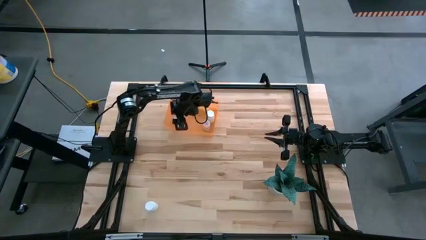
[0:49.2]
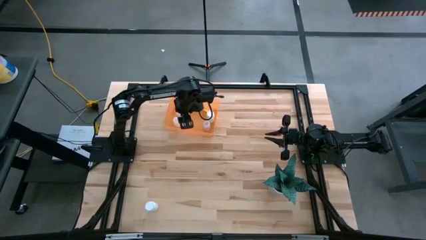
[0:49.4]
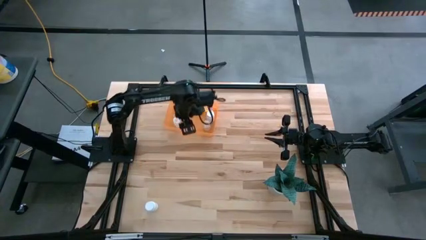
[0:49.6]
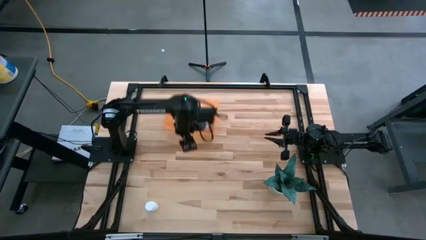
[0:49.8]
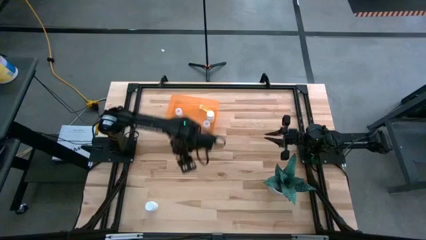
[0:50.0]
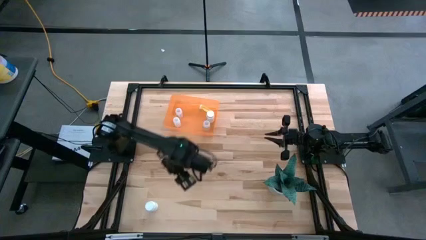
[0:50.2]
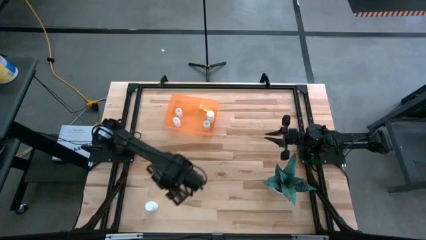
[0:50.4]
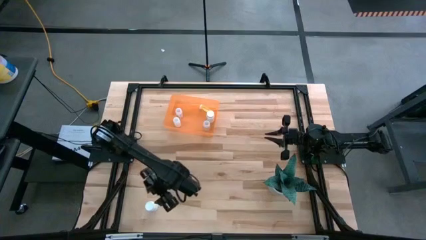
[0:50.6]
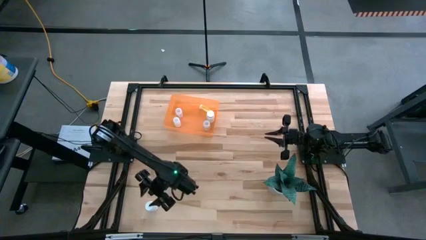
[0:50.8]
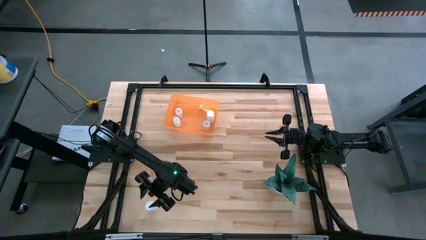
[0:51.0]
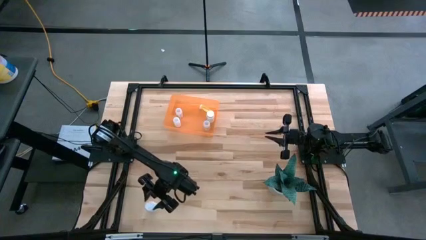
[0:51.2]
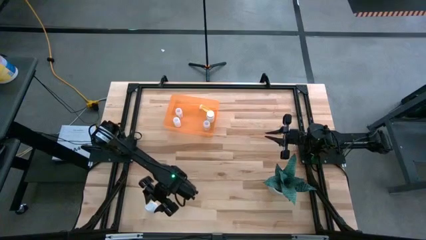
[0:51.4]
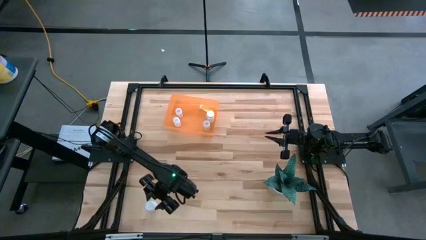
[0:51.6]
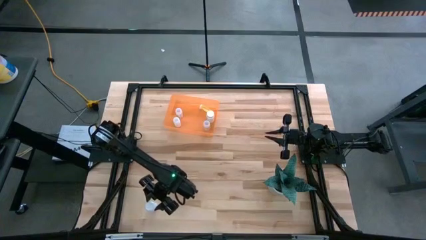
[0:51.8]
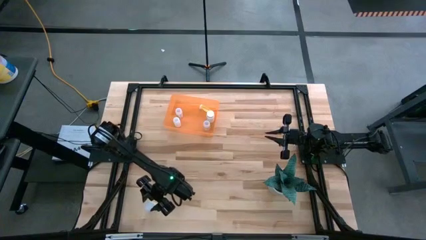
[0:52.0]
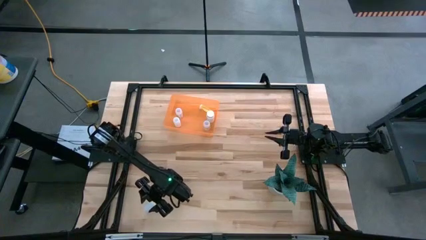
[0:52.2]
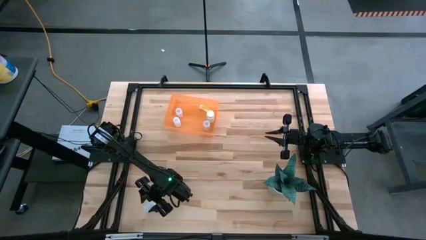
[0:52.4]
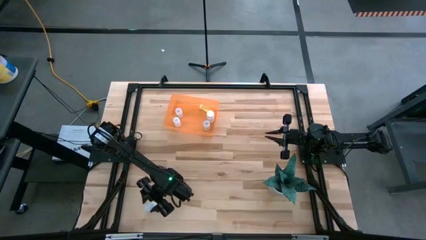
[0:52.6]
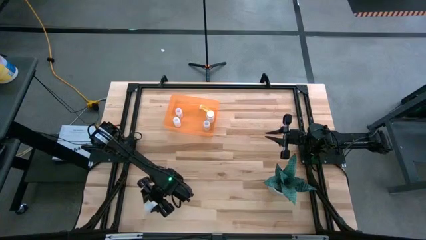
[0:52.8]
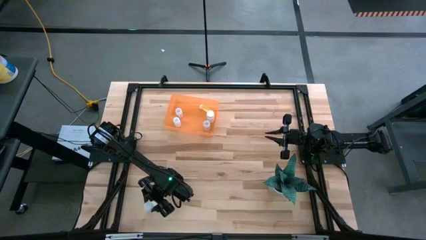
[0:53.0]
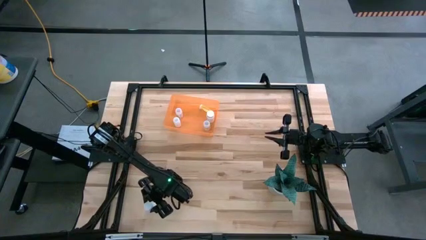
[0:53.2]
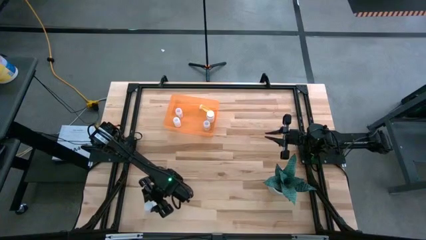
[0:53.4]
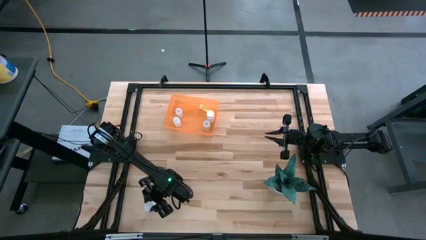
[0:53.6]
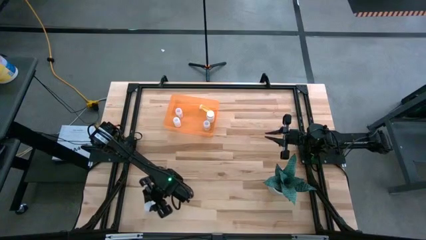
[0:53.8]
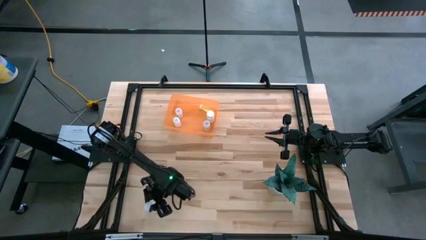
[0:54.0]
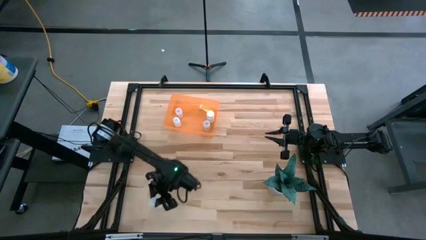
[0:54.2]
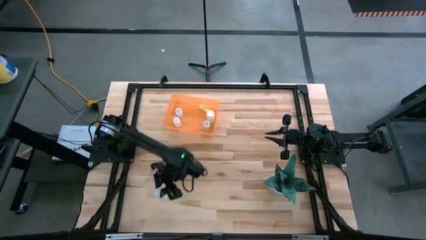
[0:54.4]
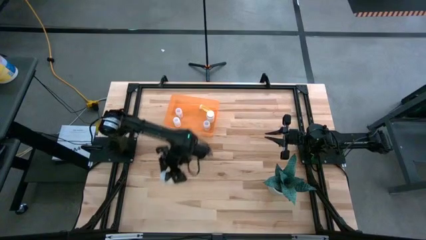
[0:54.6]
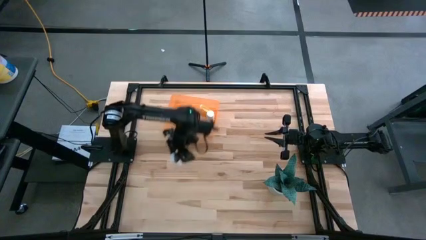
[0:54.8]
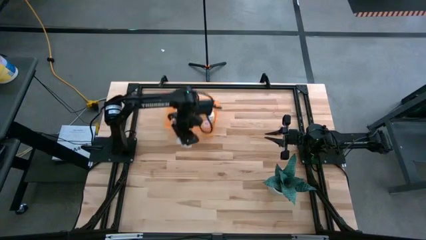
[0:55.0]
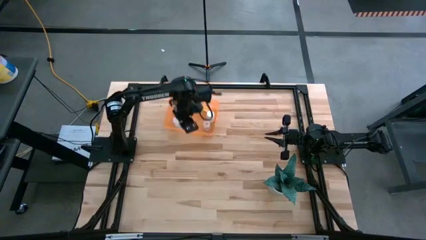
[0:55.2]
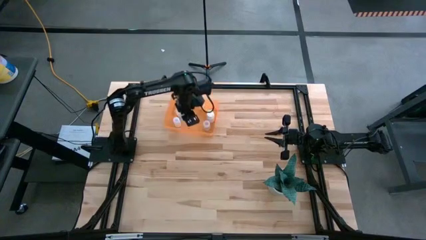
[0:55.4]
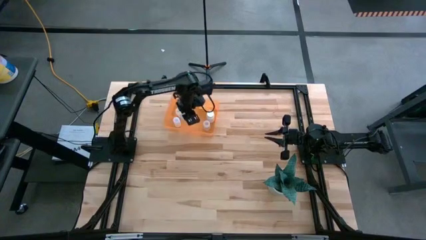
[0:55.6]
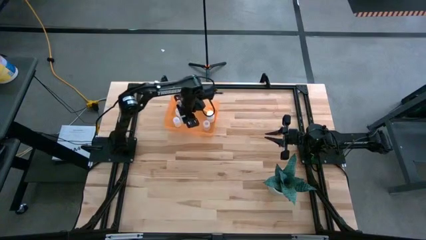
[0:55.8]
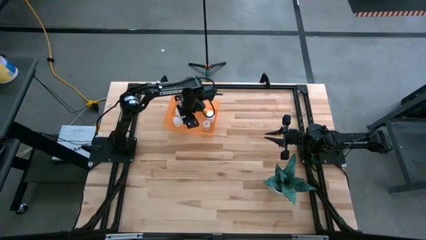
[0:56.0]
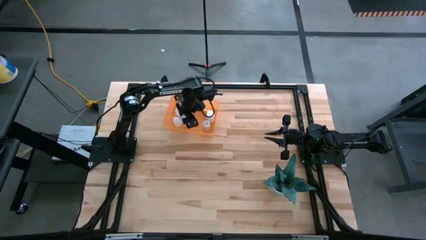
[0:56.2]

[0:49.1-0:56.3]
Task: Pick and place pill bottles into a basket
Put the white pill bottle into the orange bin

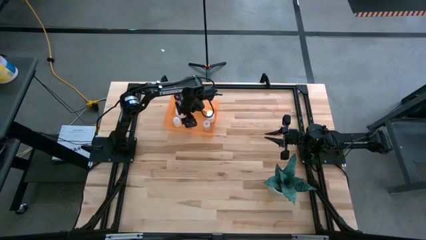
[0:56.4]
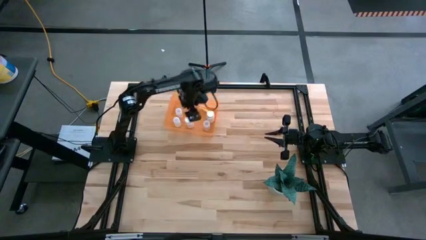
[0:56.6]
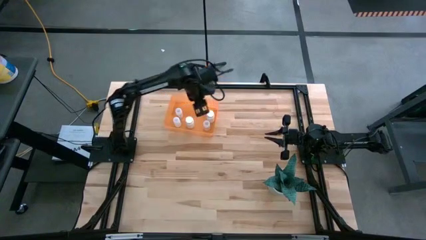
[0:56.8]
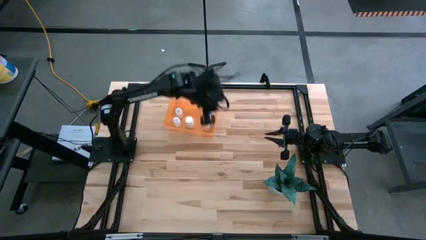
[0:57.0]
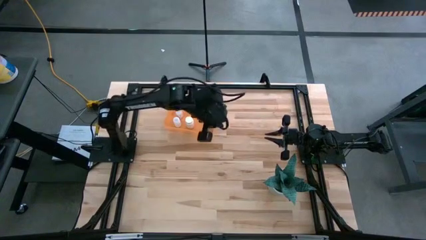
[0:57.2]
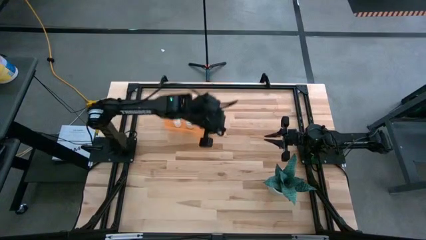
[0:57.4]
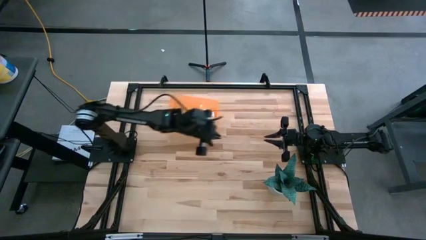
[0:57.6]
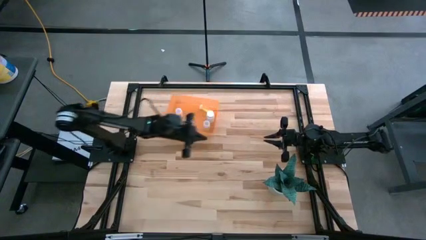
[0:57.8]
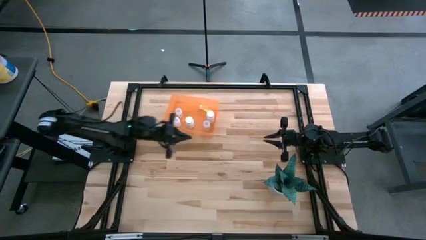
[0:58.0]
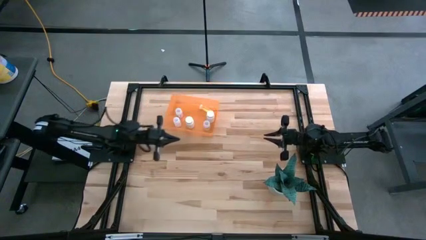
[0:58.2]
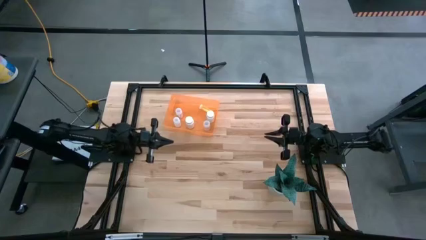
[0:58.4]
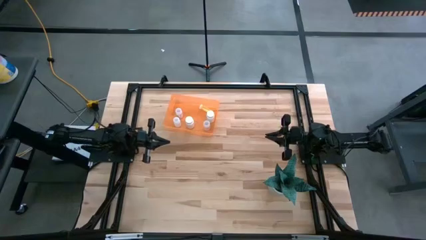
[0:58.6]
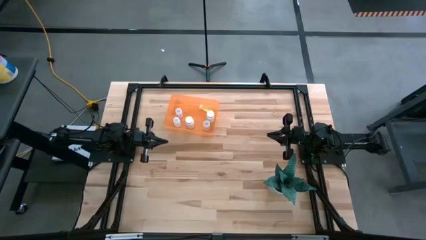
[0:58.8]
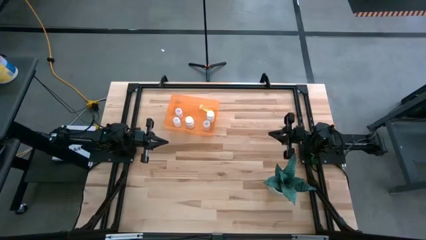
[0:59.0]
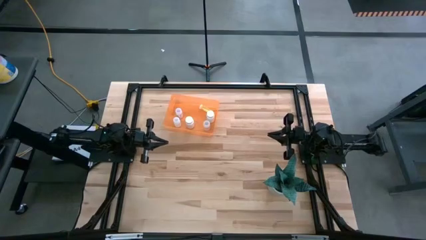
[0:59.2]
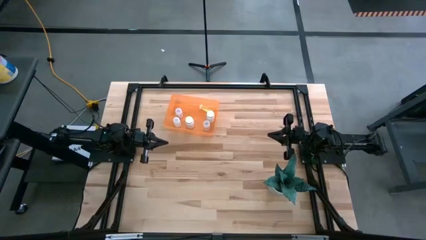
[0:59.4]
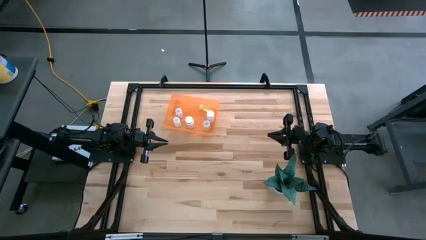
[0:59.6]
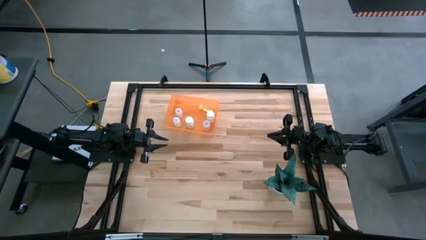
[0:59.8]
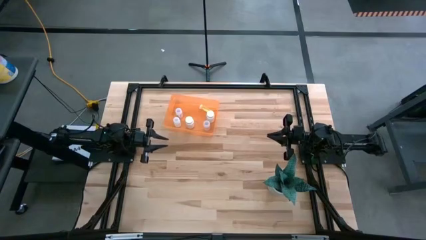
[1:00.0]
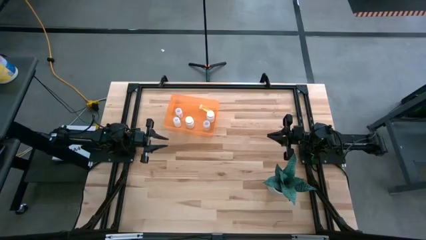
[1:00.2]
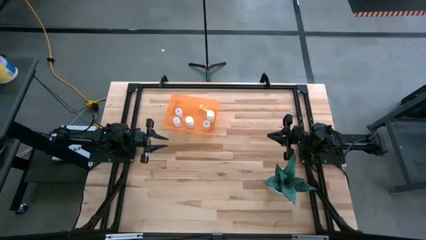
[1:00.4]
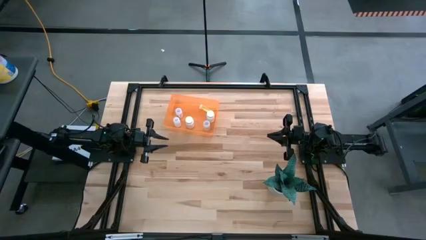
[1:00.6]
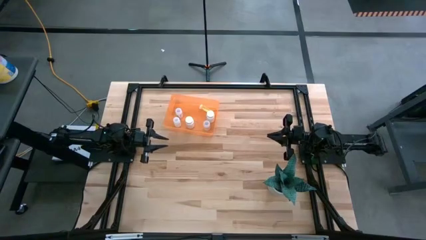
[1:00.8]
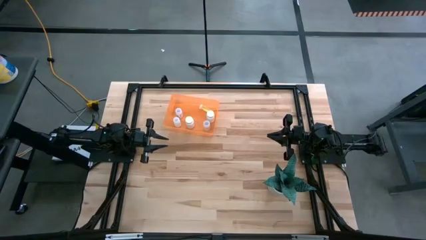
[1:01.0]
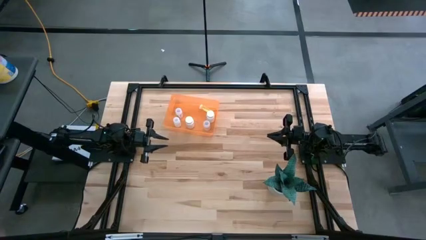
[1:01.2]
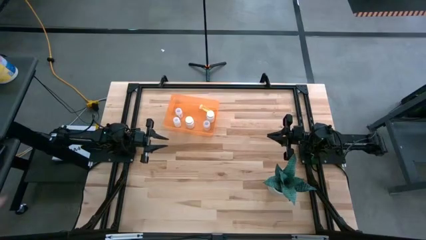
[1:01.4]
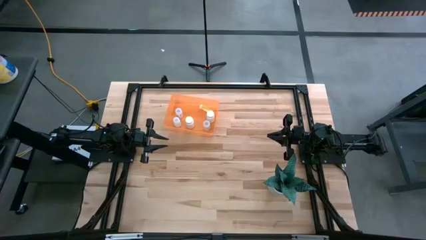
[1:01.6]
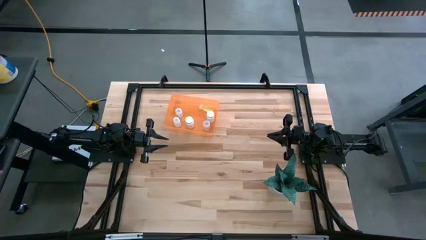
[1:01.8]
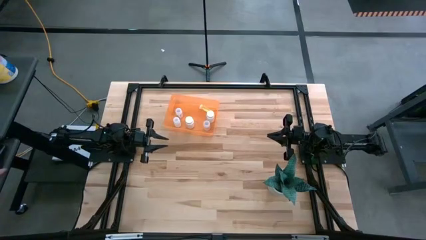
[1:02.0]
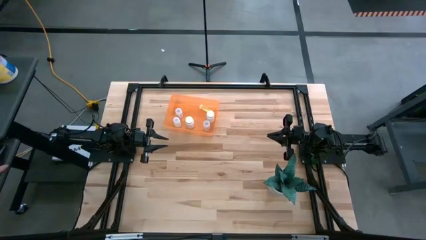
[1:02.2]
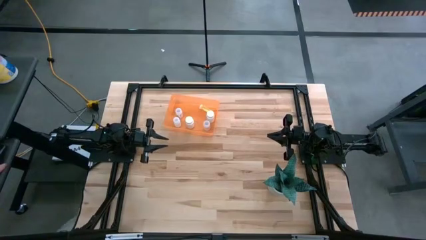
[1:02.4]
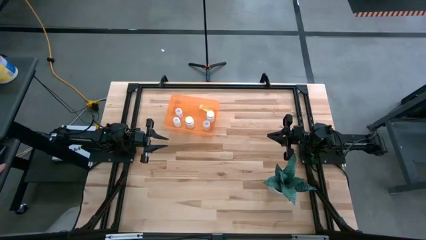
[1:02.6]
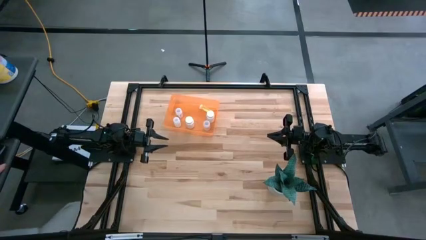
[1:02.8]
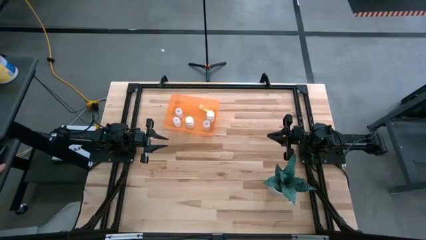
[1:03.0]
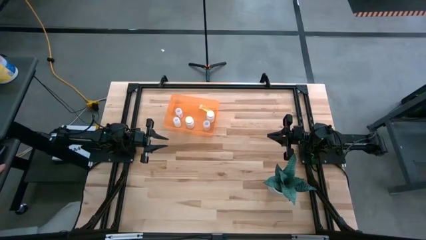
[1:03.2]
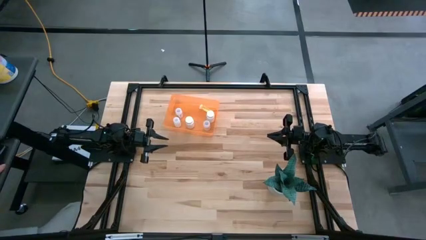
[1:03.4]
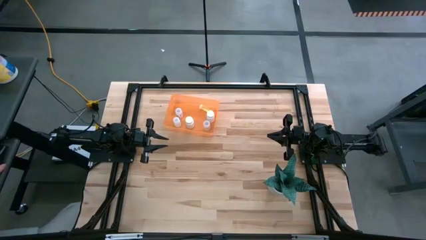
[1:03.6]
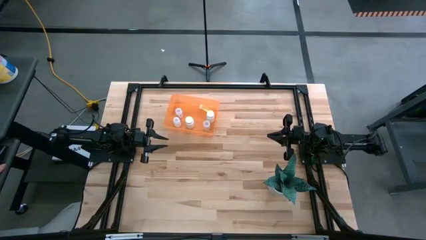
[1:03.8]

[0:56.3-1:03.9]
Return to Home Position

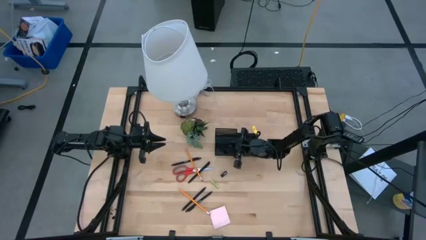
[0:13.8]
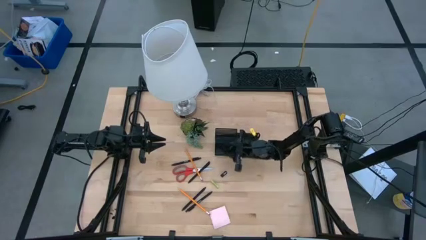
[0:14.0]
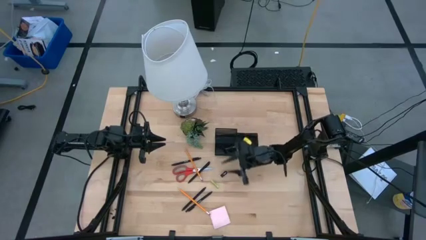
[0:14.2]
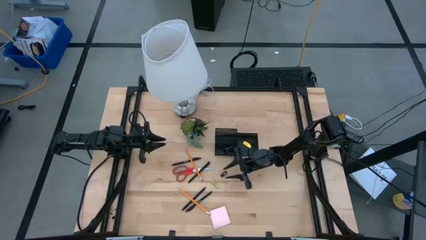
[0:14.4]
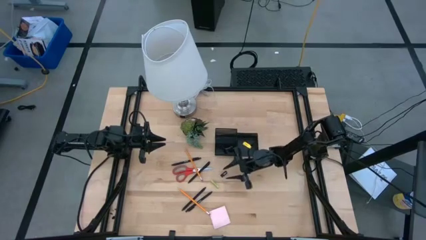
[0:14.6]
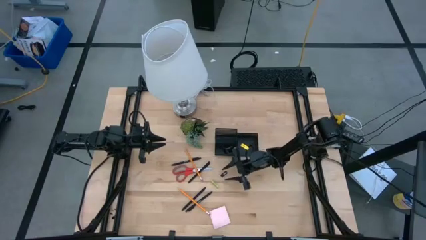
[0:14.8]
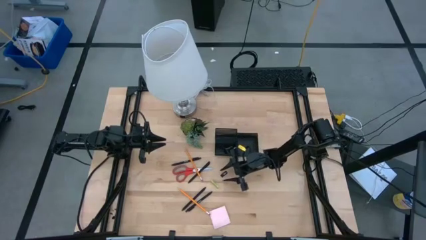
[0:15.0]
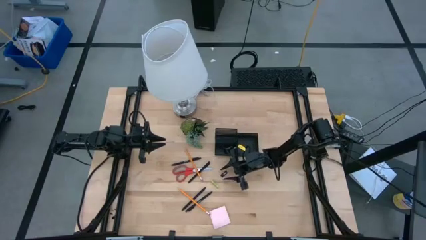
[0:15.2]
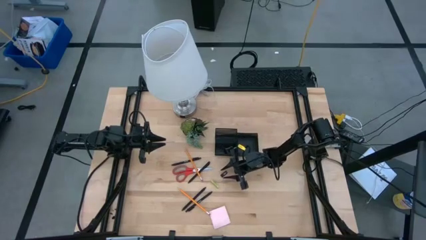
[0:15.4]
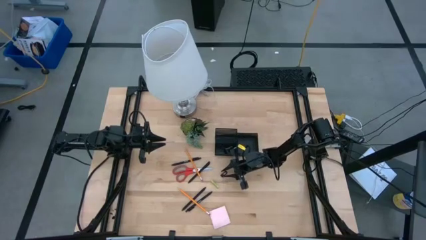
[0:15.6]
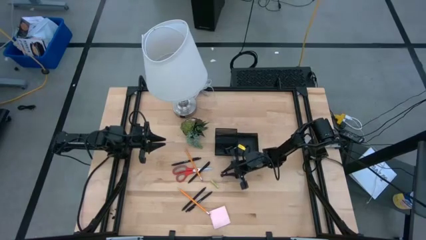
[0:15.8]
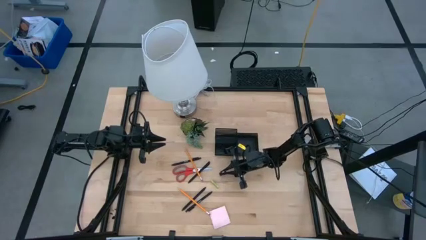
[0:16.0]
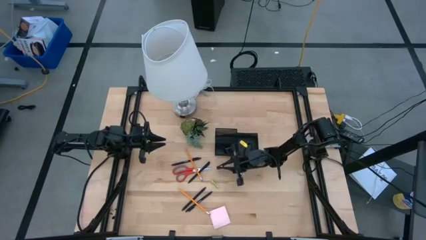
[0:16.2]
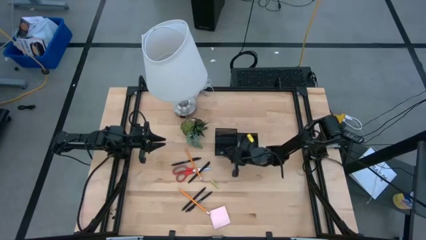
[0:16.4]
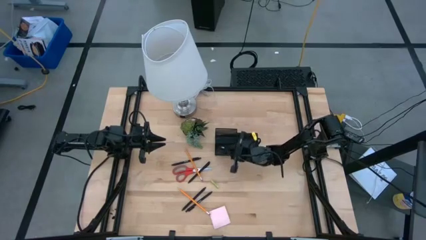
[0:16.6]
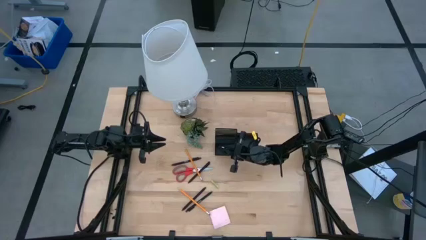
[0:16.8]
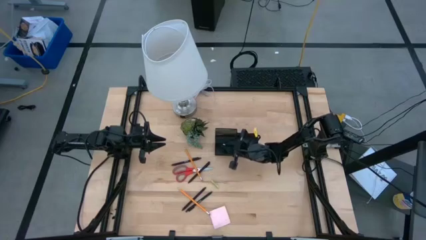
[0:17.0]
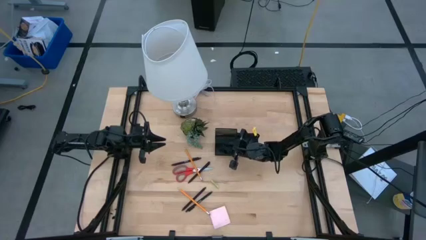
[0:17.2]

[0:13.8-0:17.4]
Task: Pick and place office supplies into organizer
Put the black binder clip into the desk organizer
